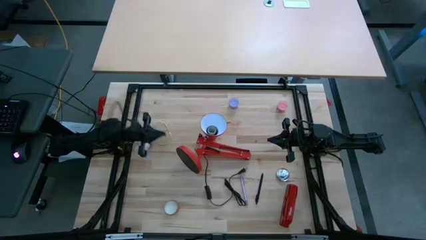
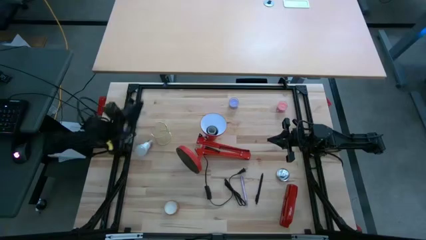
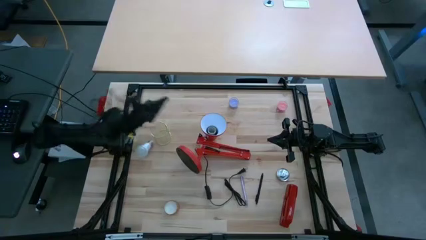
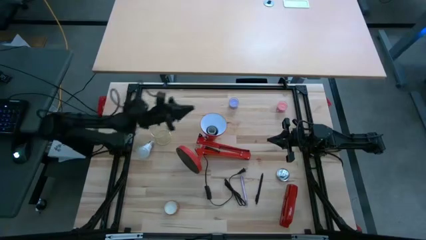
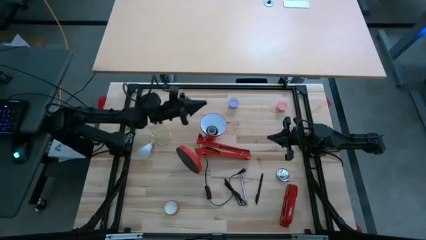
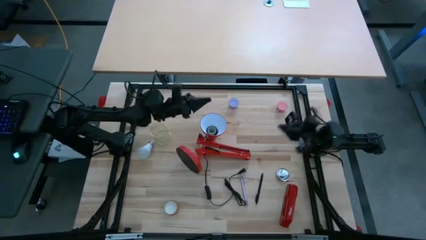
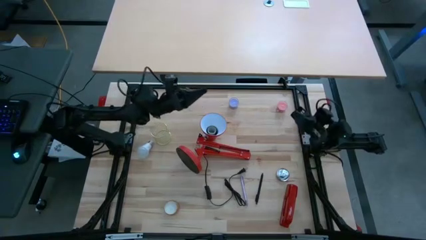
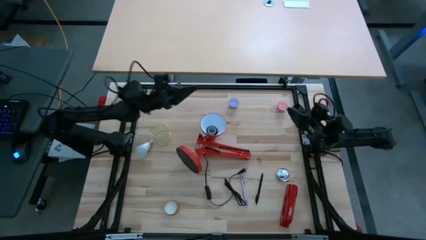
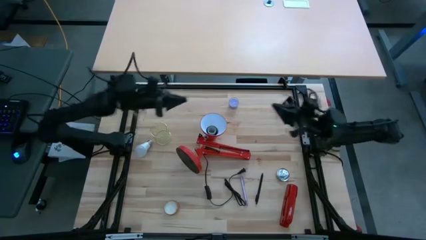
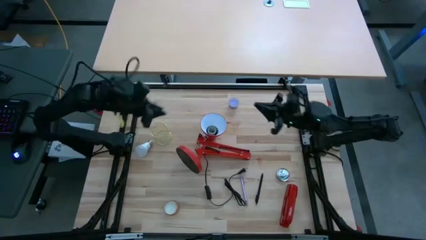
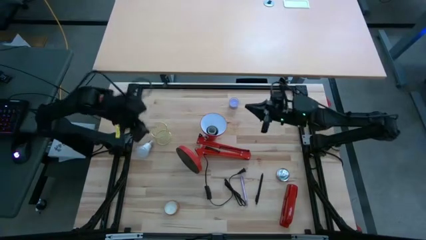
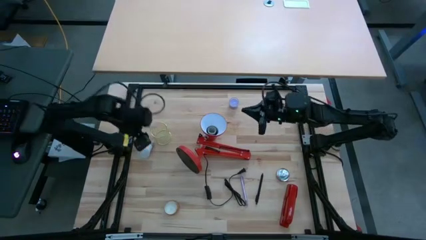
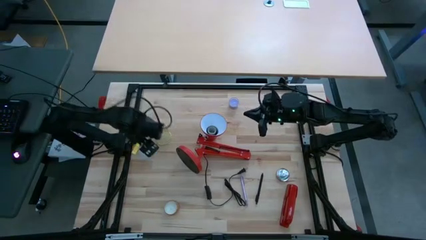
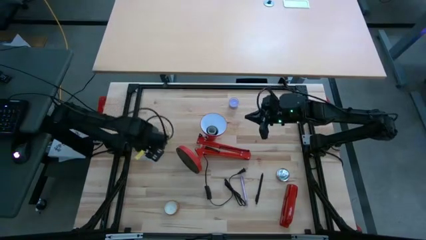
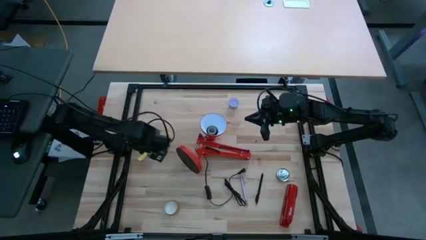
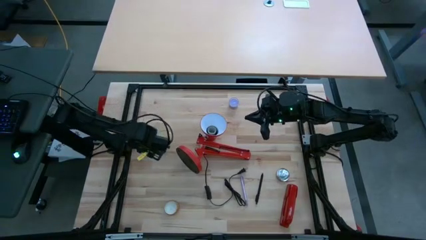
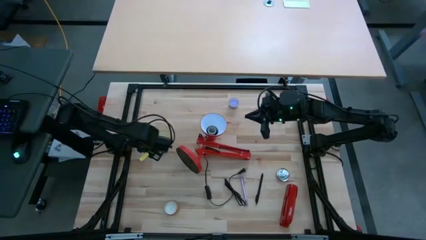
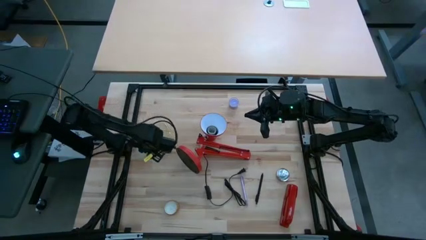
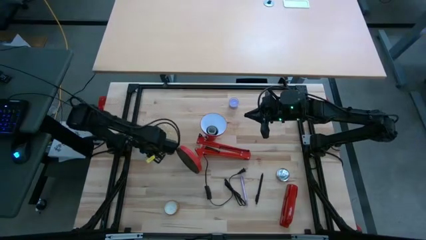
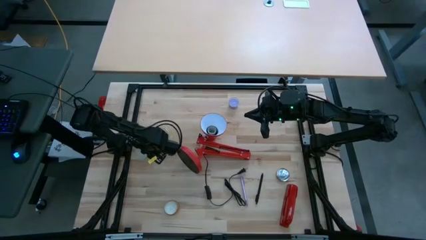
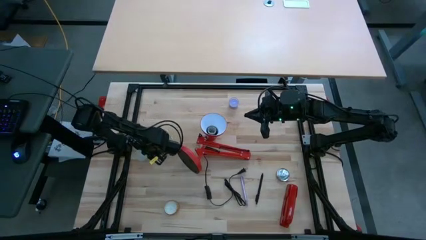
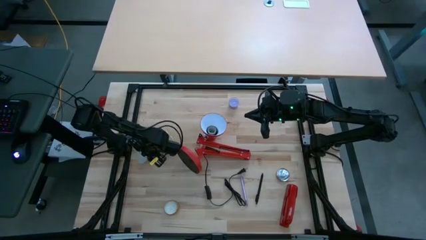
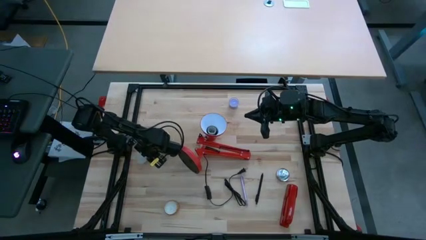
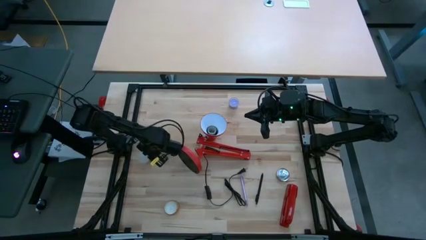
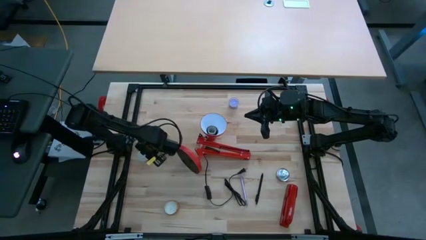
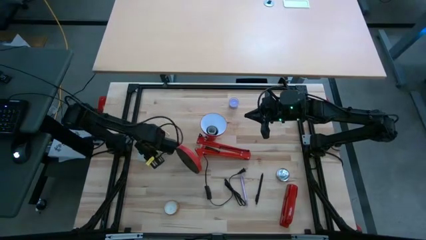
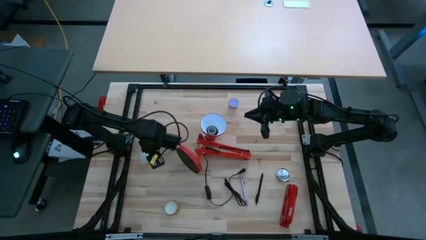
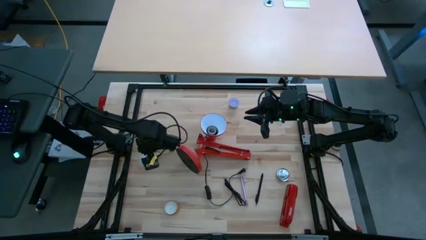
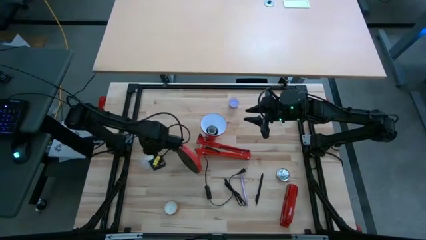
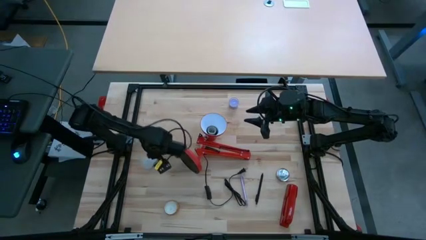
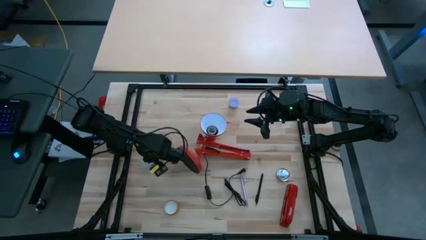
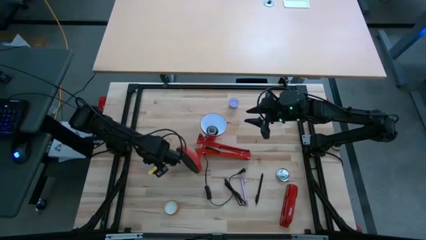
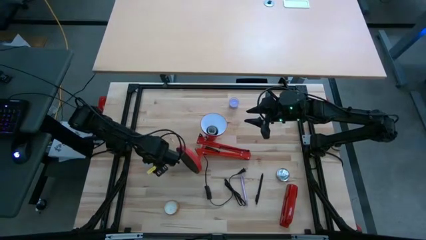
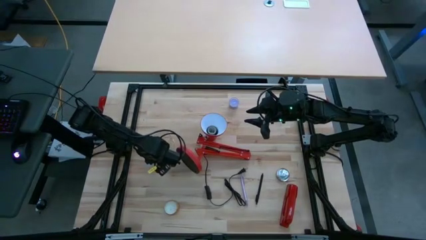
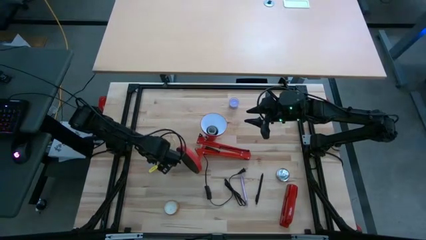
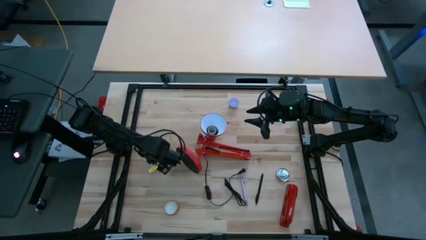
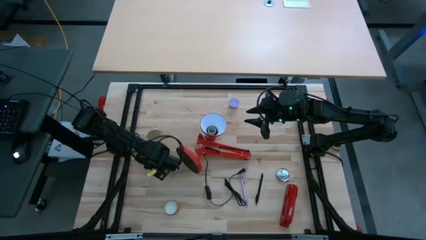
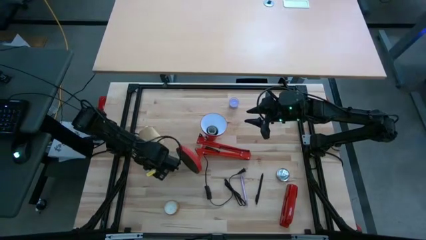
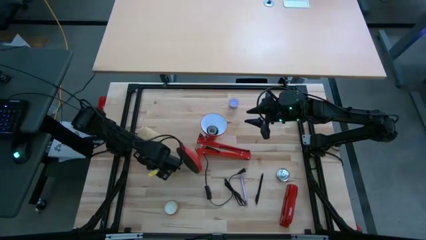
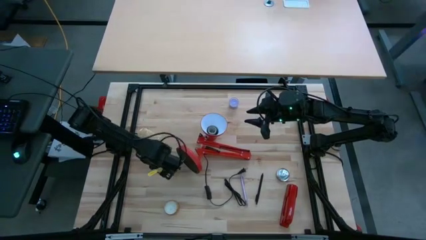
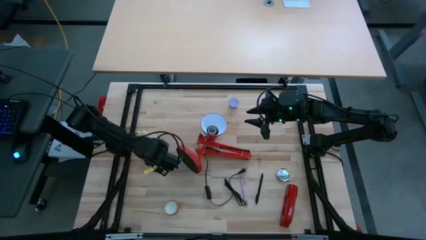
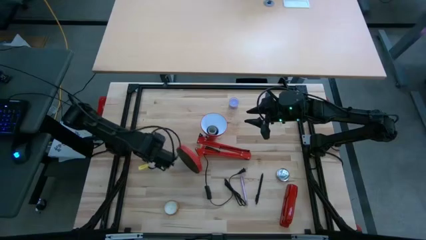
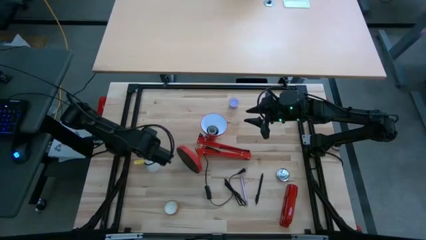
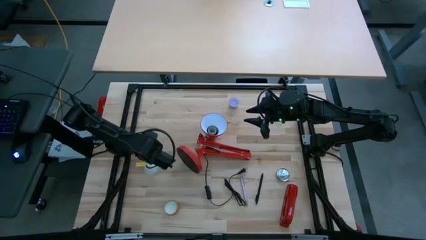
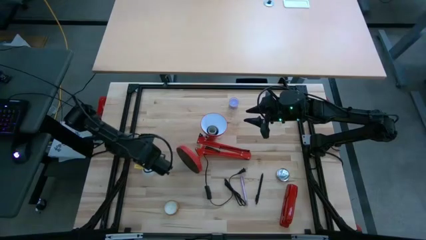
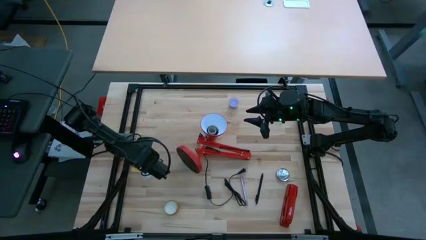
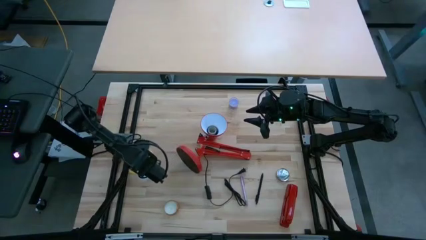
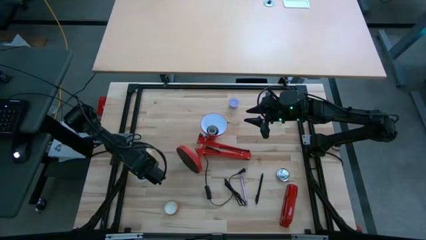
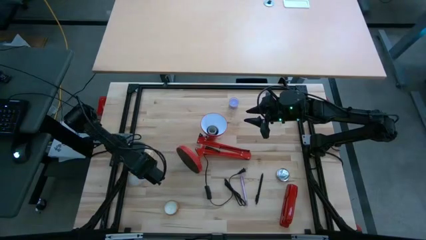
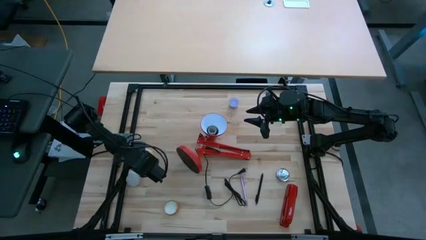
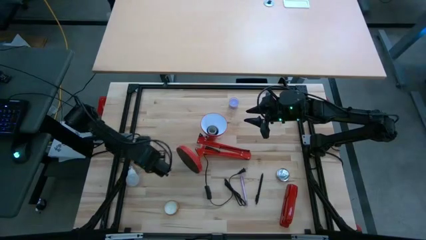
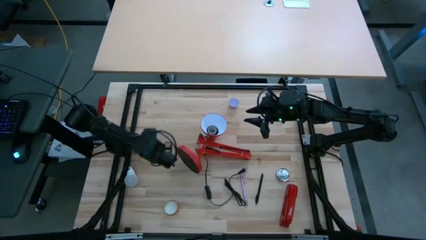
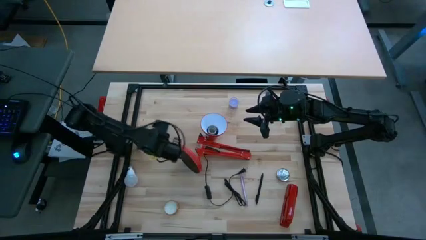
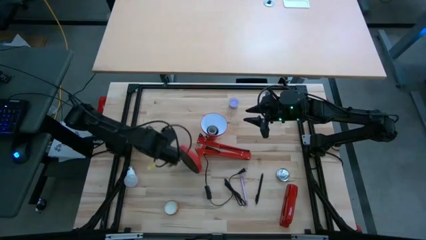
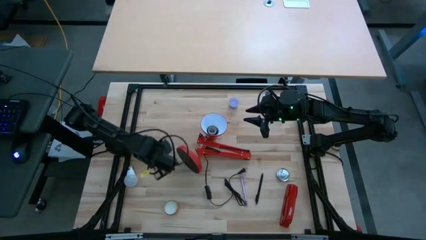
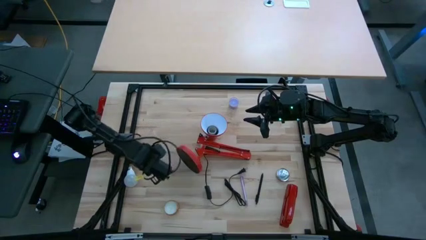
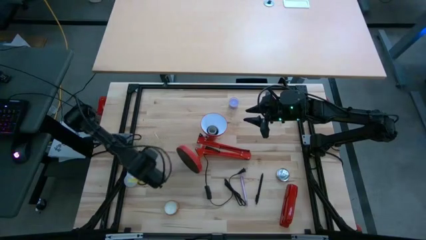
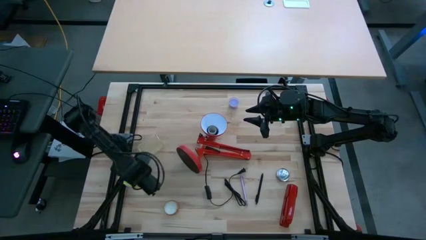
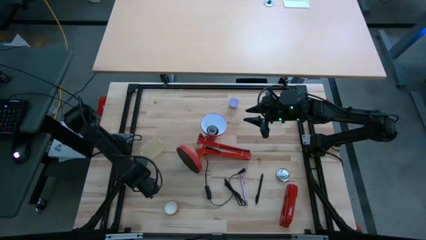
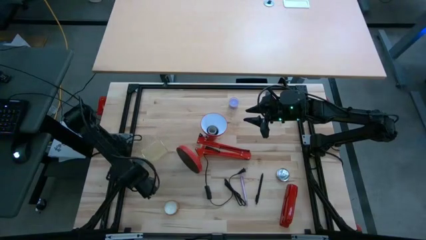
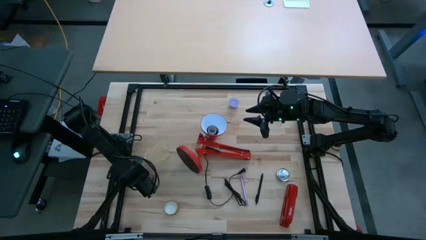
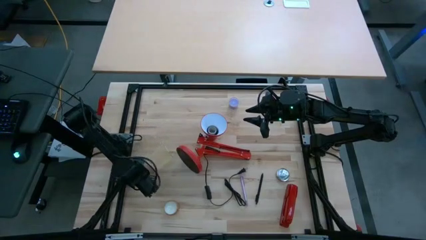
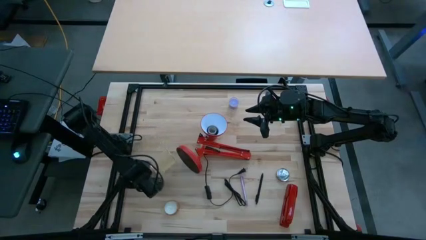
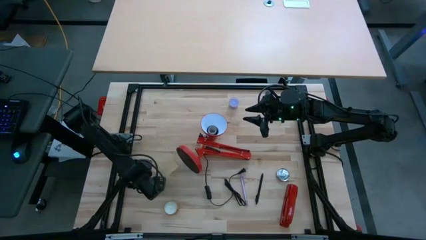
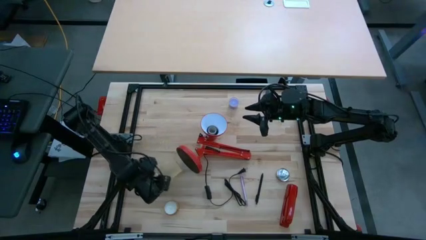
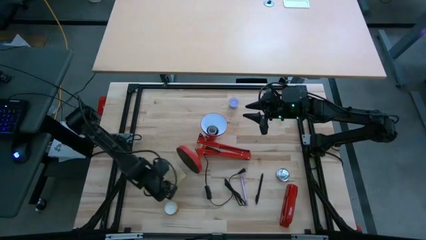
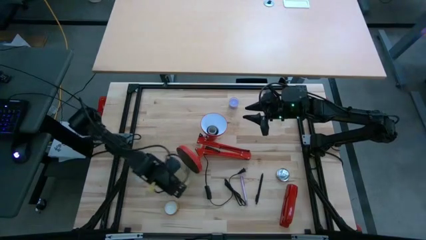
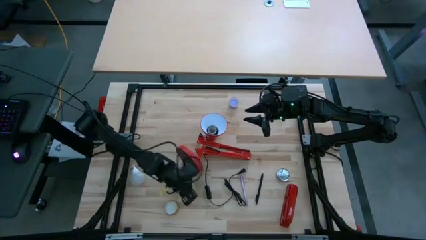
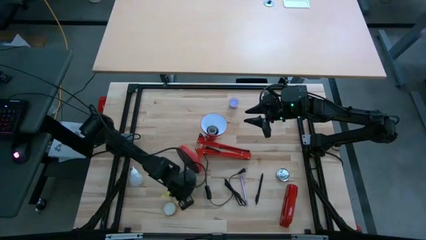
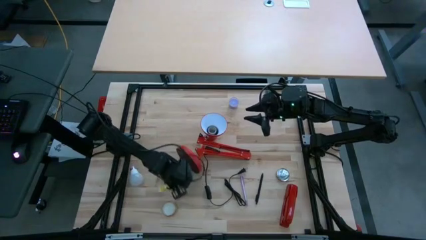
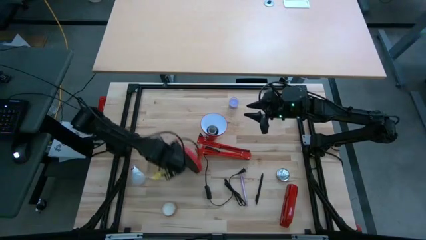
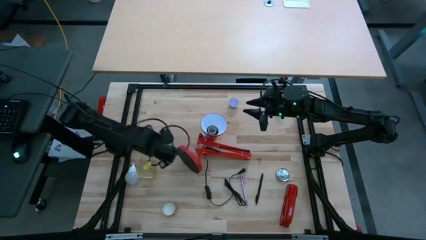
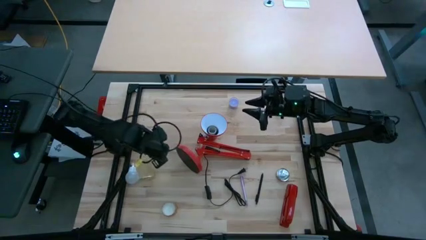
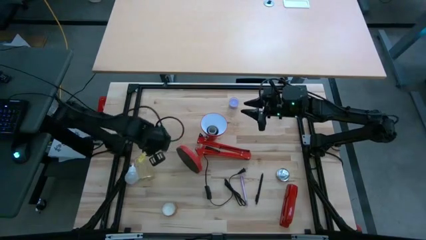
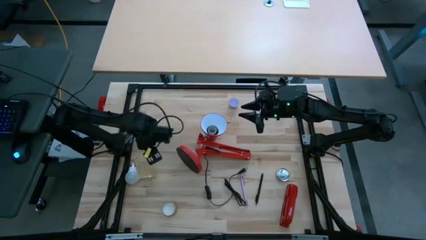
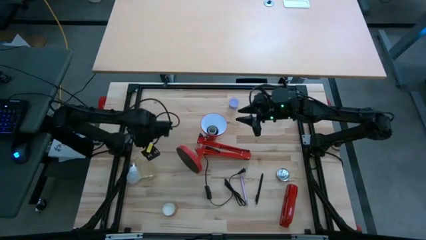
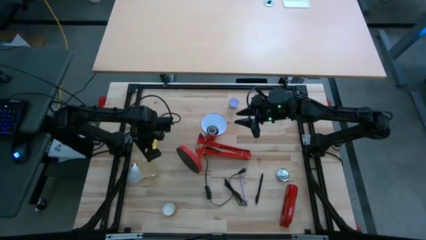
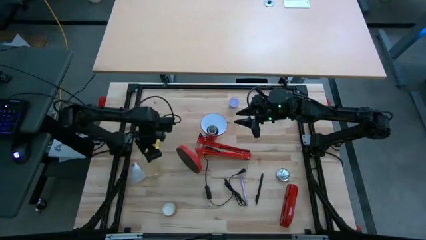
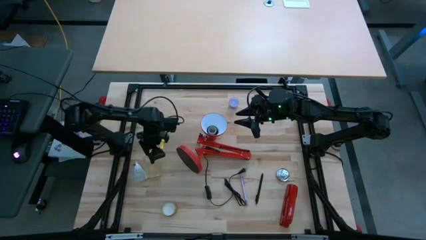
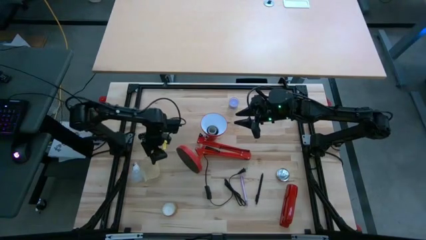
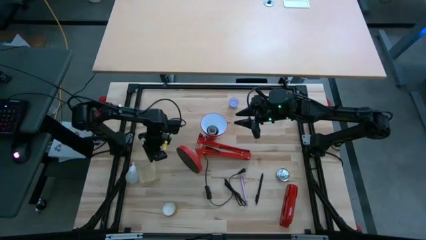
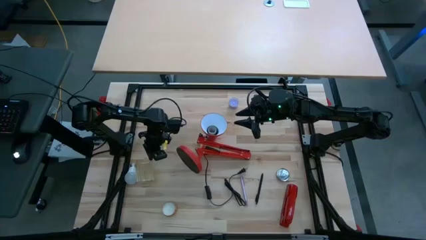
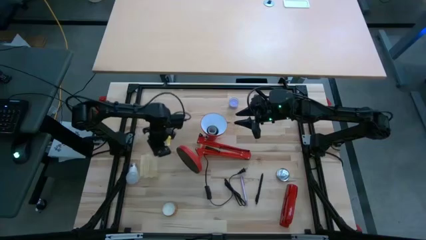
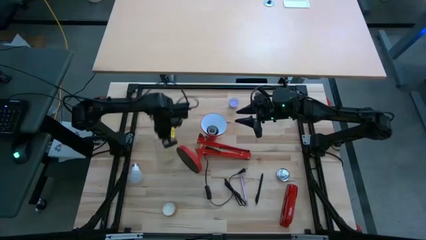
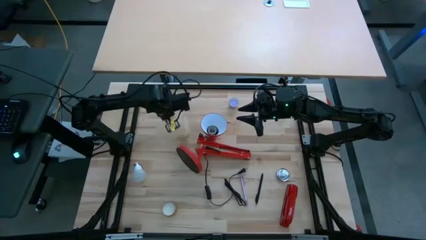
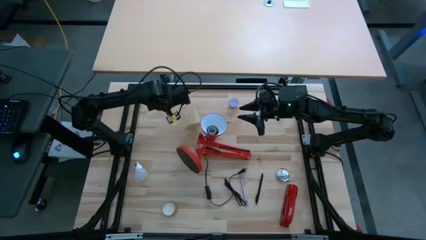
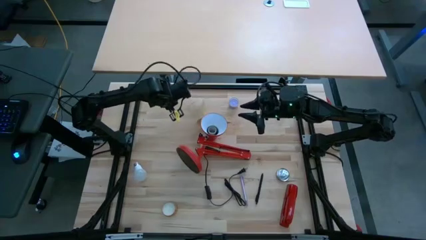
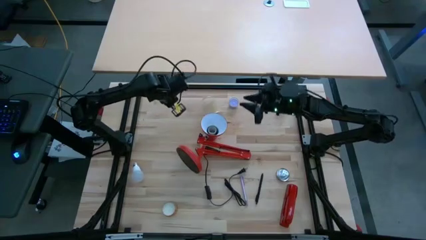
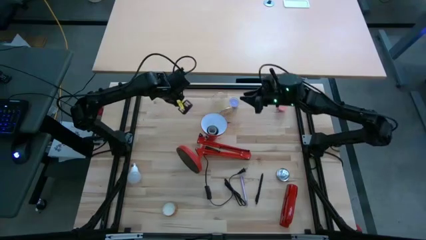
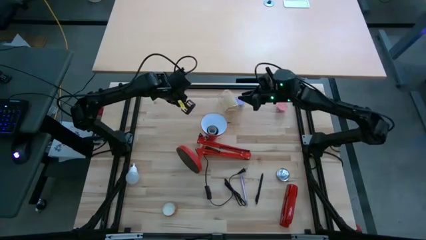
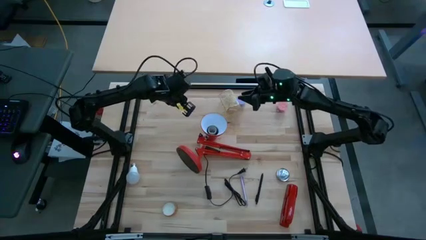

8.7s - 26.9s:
Task: Screw lightbulb
Insert the white lightbulb into the desk lamp
